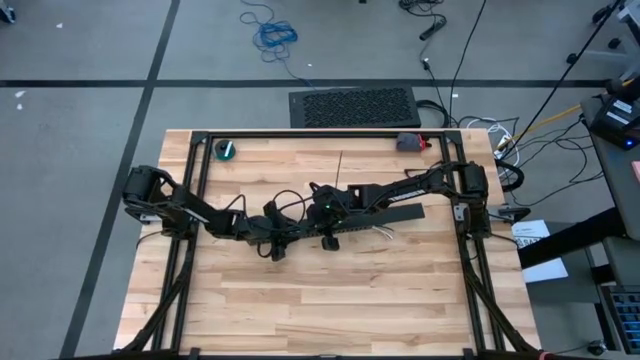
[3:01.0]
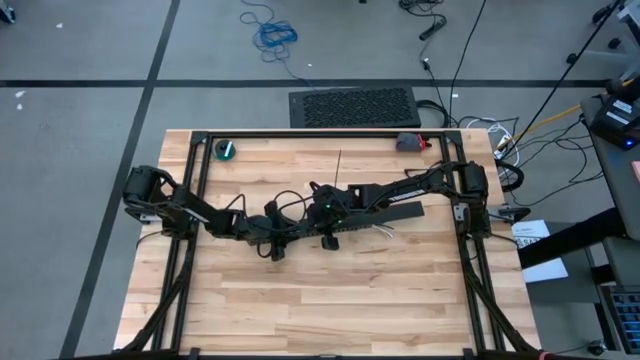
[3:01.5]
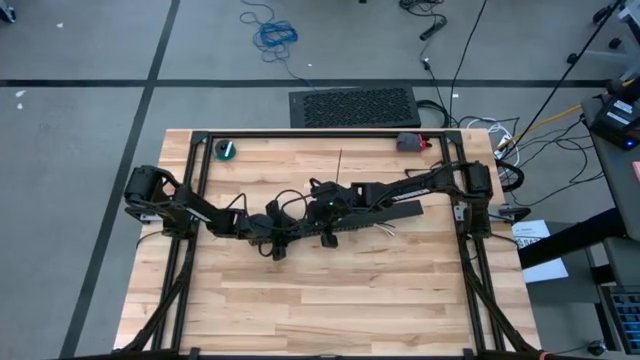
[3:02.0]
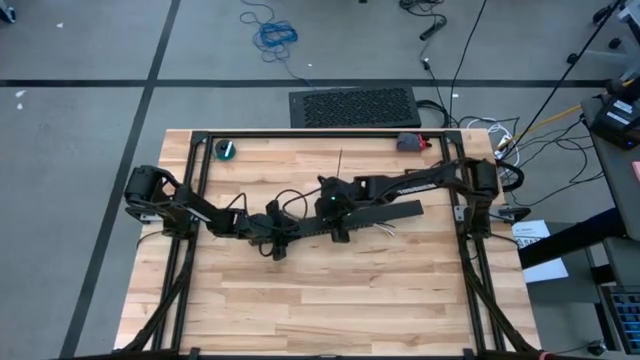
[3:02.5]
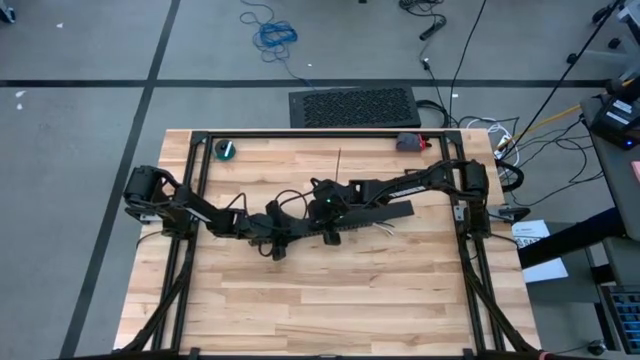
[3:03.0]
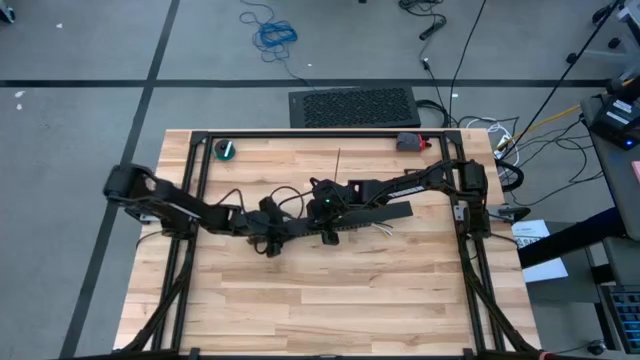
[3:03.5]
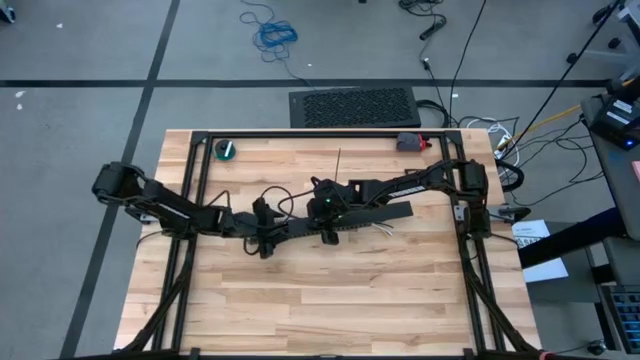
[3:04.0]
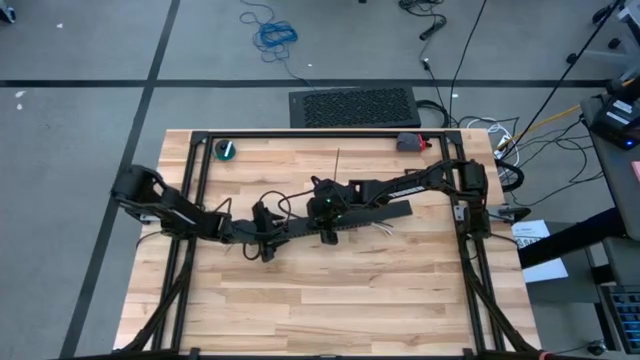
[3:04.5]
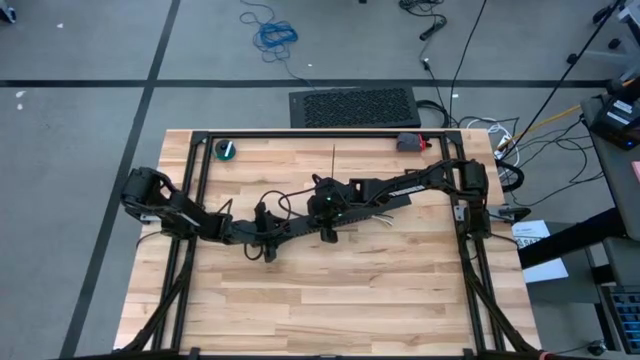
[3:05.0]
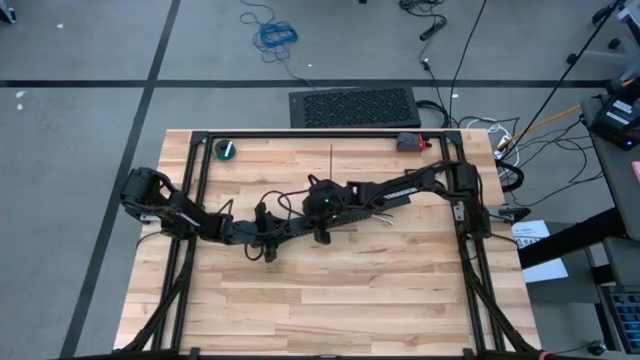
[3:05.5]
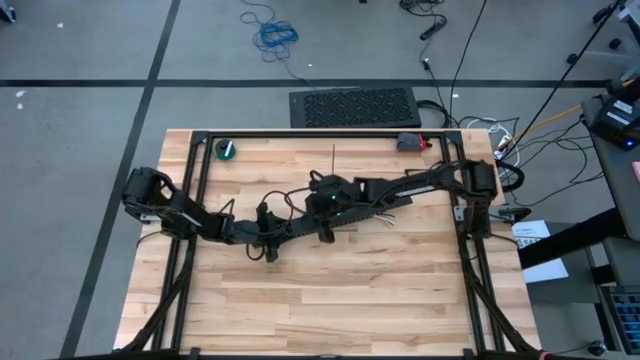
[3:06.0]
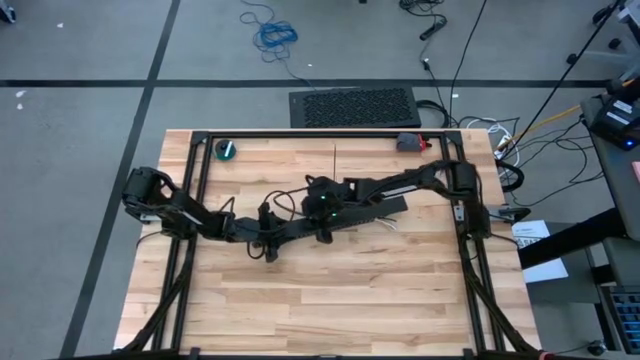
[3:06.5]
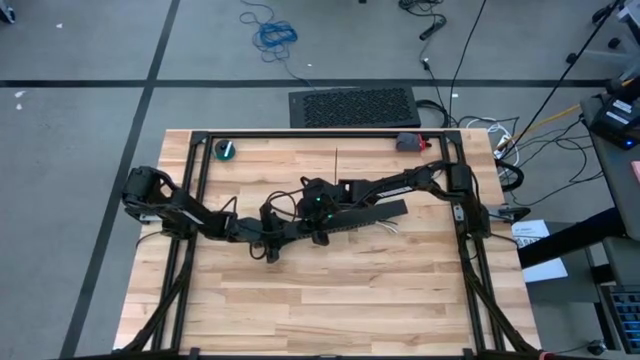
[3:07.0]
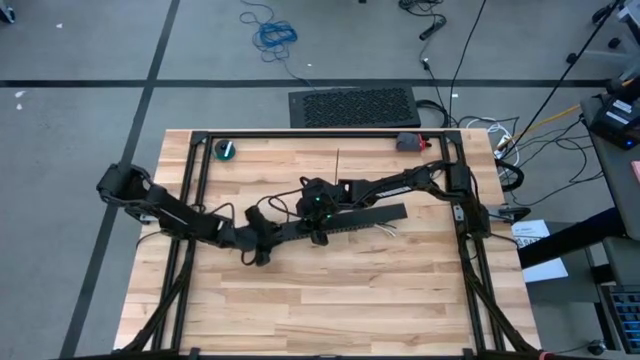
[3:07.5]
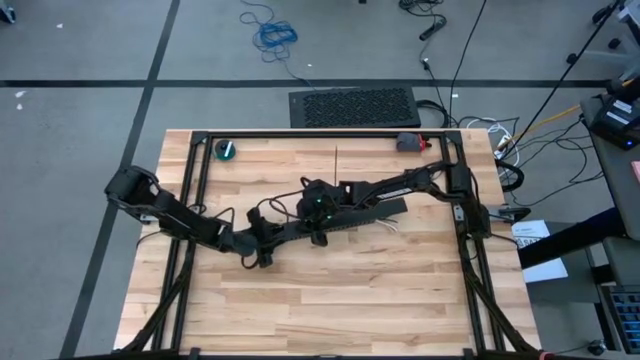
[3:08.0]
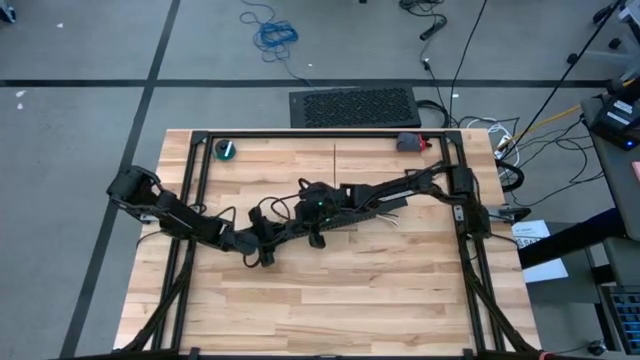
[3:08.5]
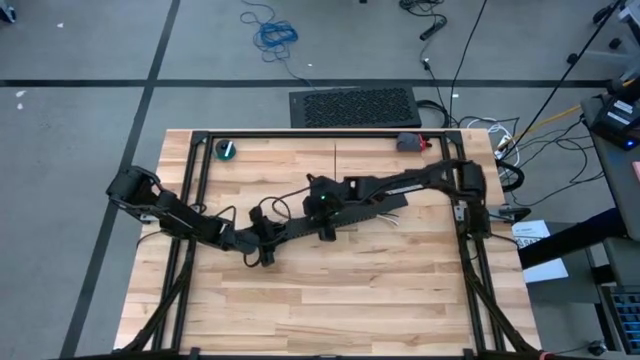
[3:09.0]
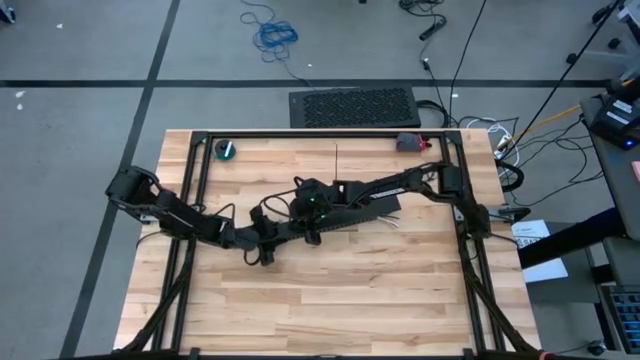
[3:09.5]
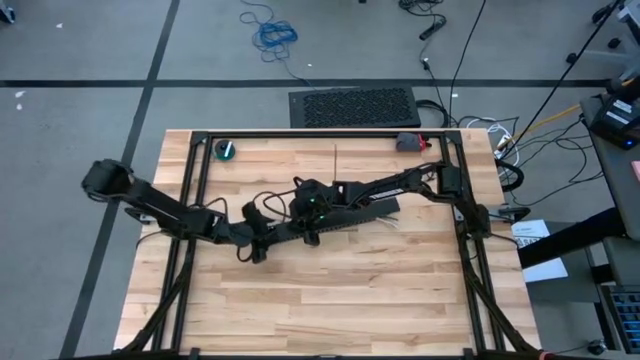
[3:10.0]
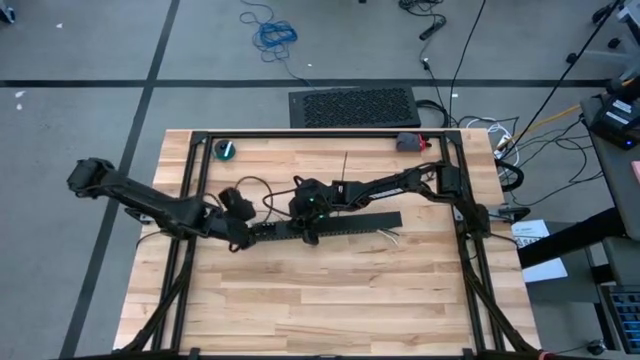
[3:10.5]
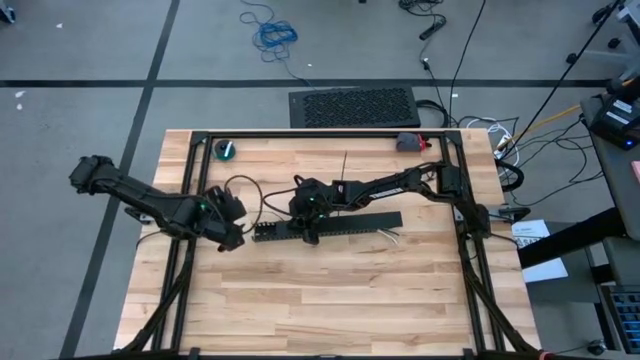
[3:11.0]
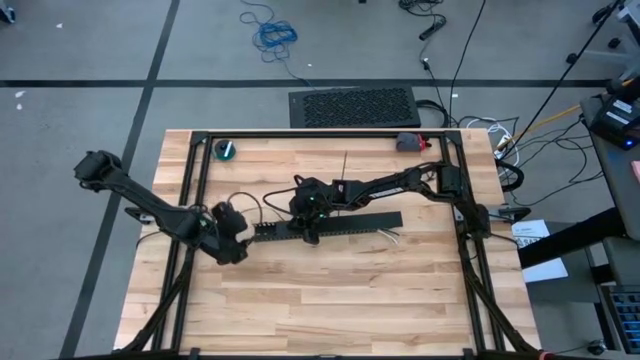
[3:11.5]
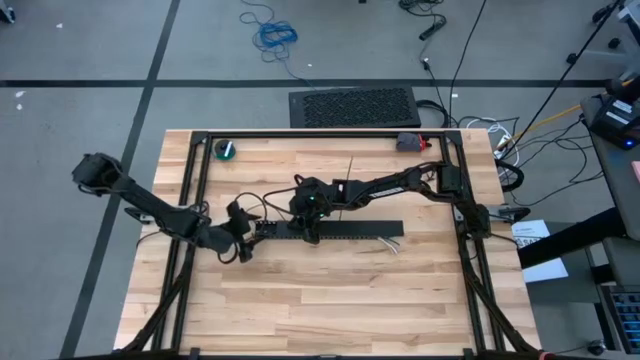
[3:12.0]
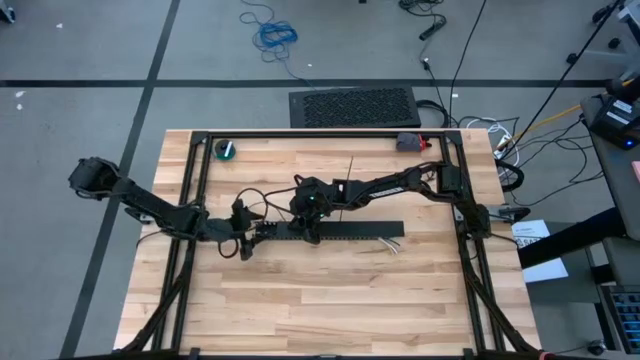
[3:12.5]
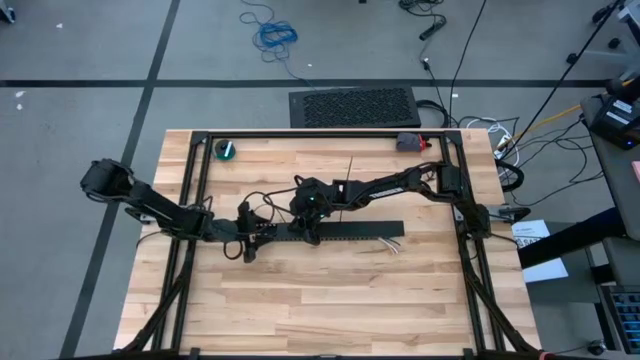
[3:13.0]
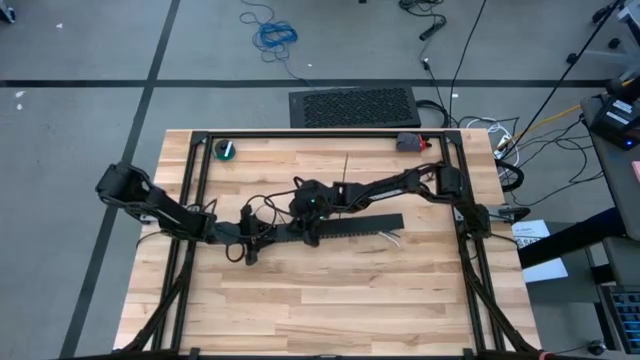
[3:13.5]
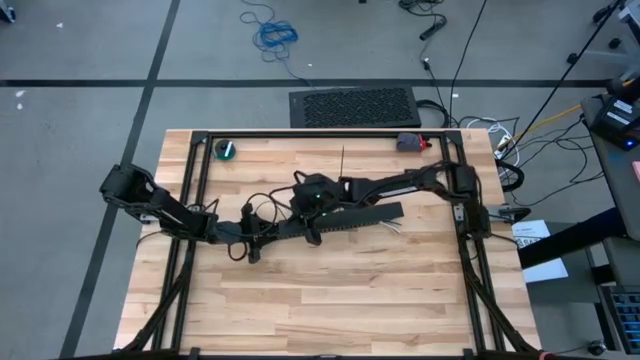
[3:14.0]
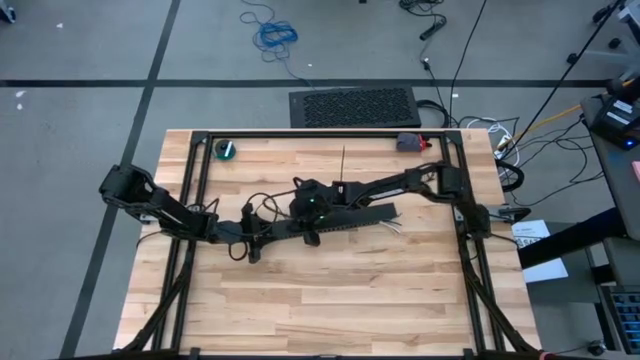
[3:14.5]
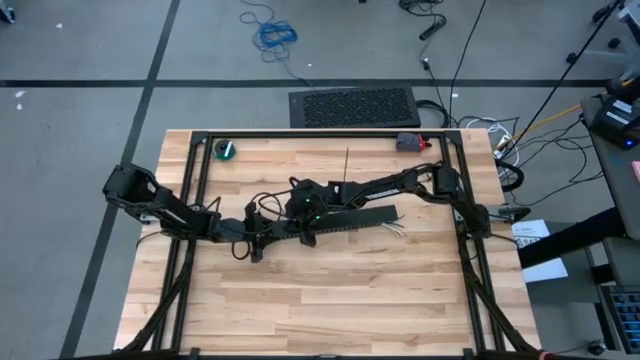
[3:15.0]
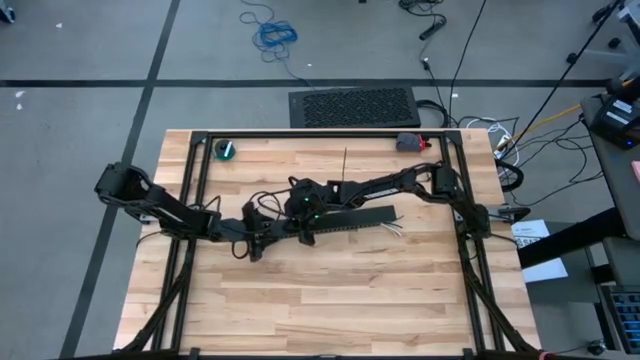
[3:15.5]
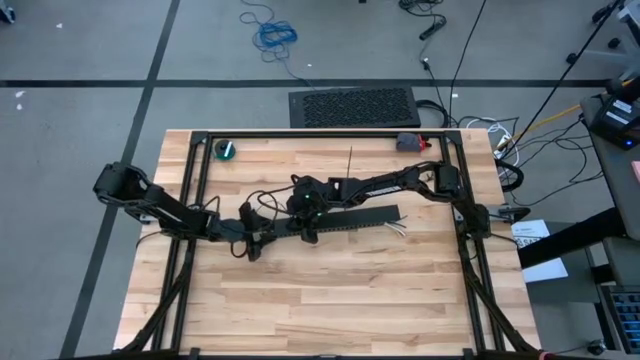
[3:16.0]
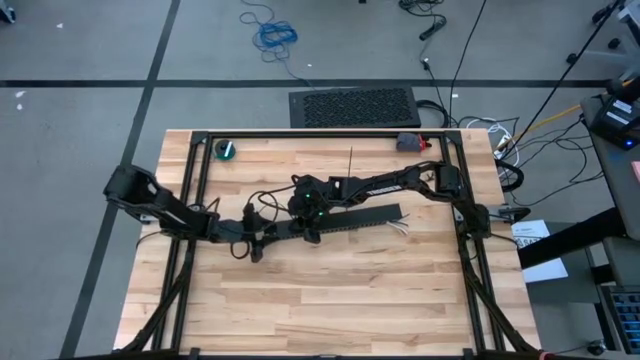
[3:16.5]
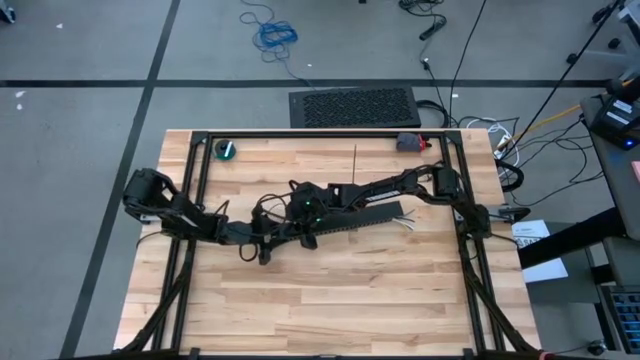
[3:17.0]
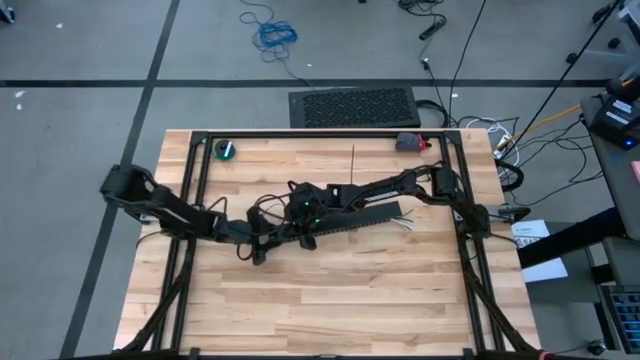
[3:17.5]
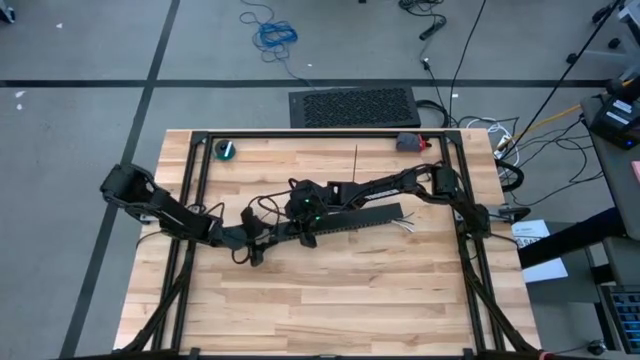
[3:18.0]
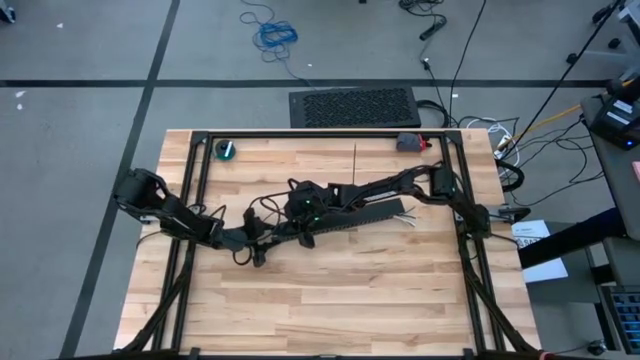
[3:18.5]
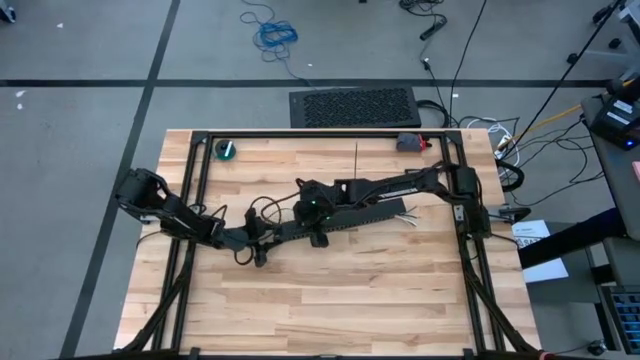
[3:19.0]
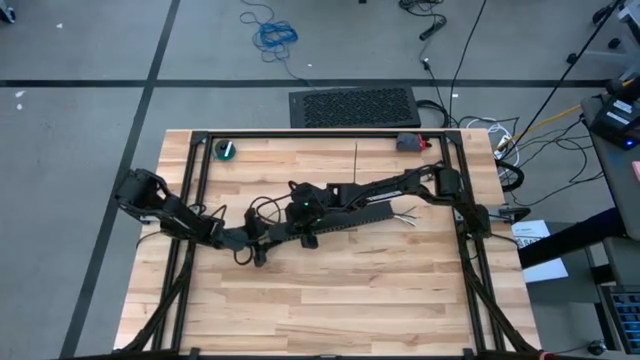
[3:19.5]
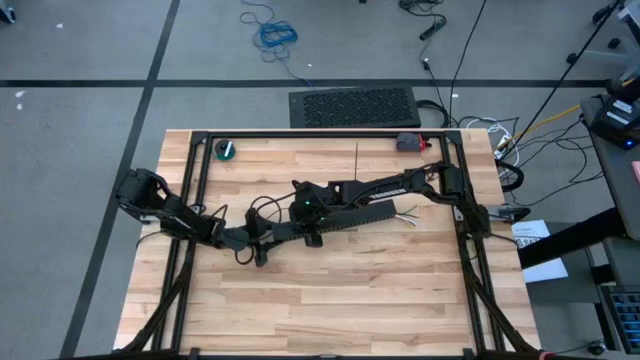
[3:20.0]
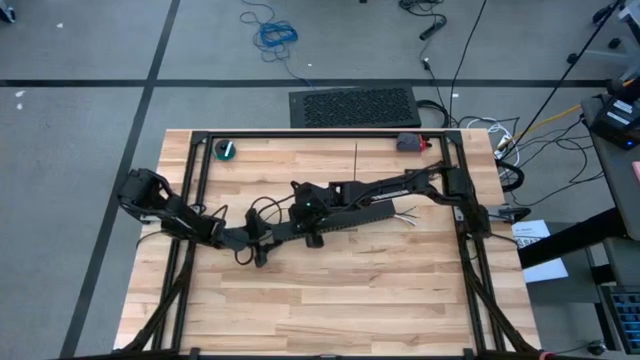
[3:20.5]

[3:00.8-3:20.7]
Task: Ziptie cables
Insert the cable duct cover
